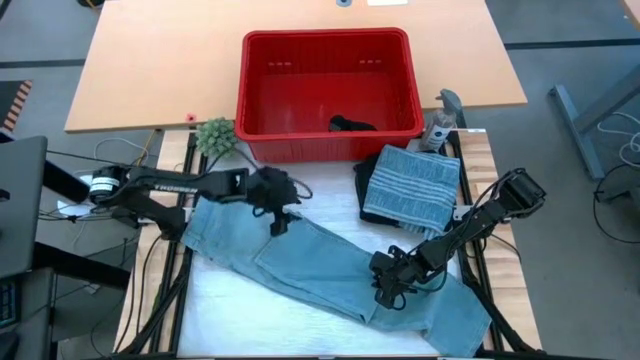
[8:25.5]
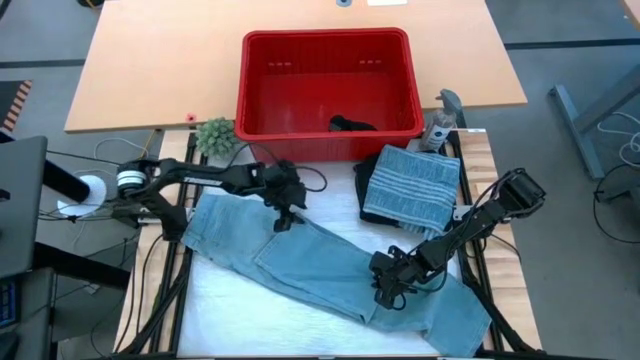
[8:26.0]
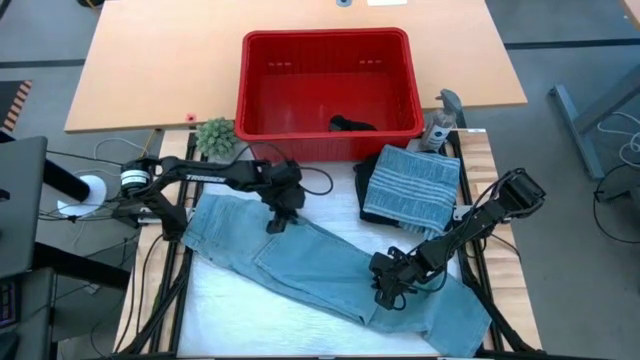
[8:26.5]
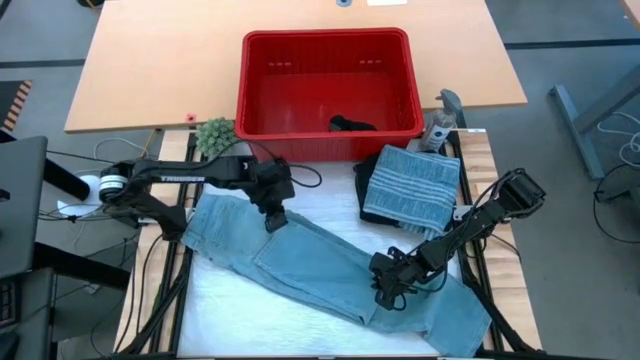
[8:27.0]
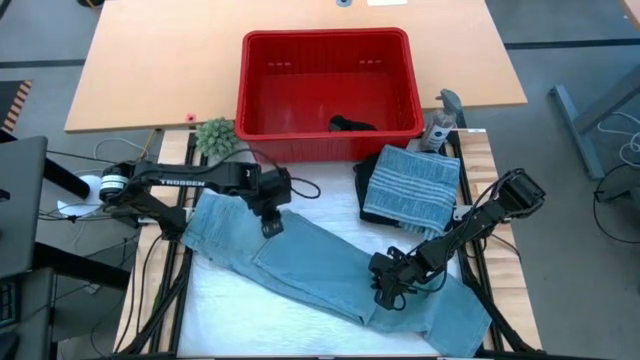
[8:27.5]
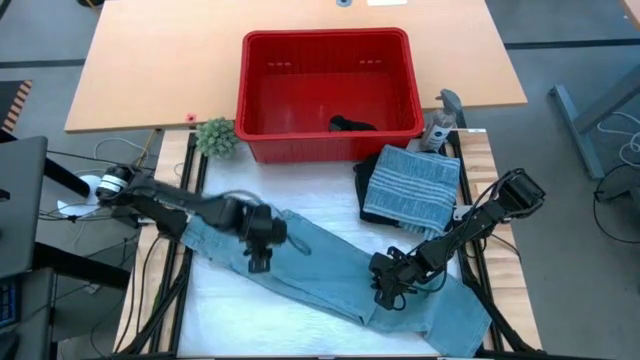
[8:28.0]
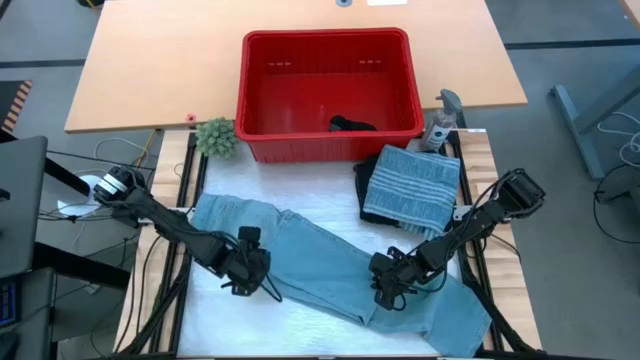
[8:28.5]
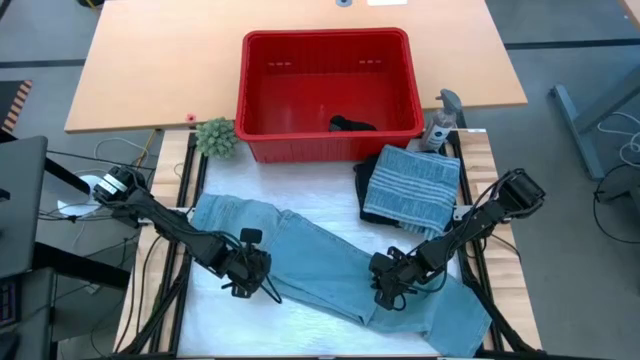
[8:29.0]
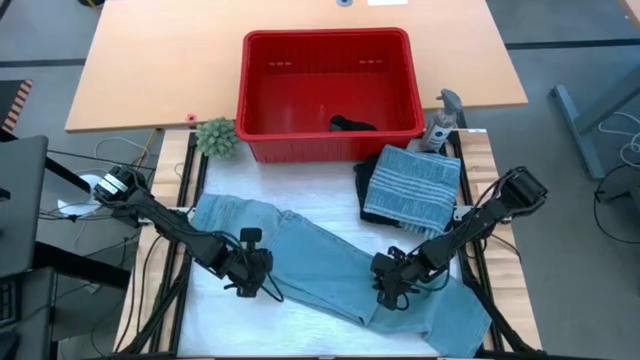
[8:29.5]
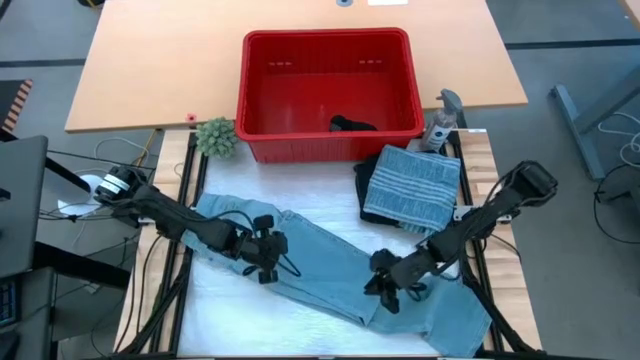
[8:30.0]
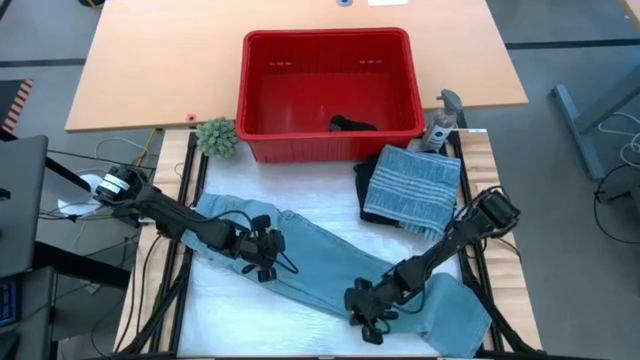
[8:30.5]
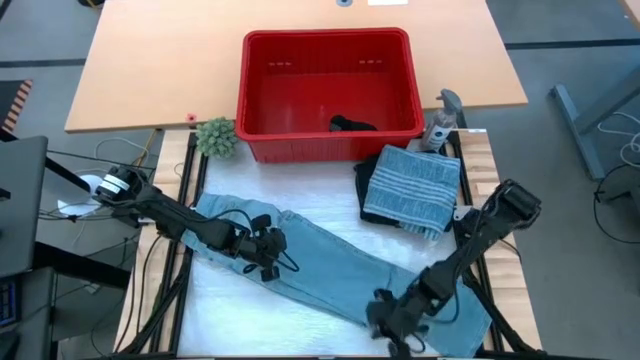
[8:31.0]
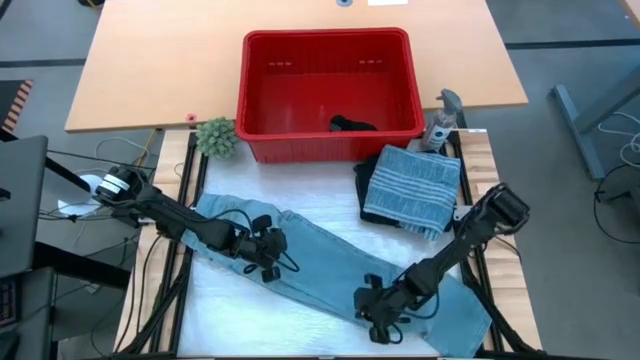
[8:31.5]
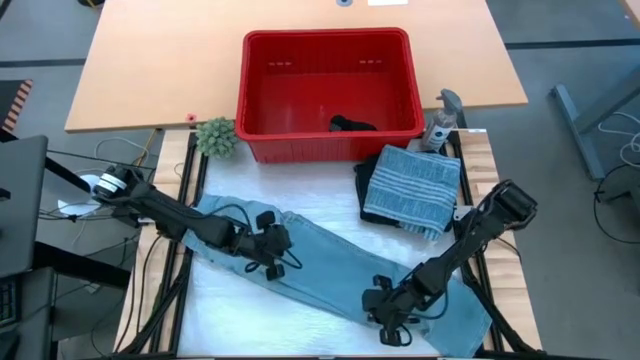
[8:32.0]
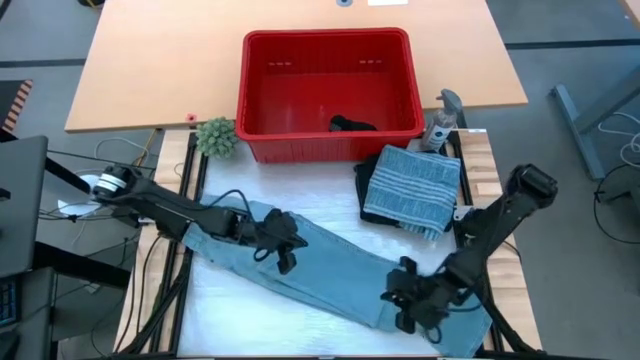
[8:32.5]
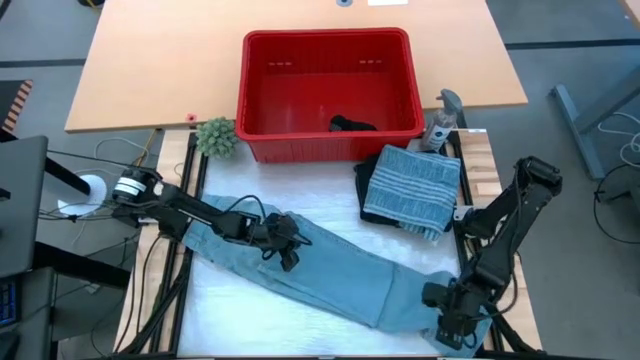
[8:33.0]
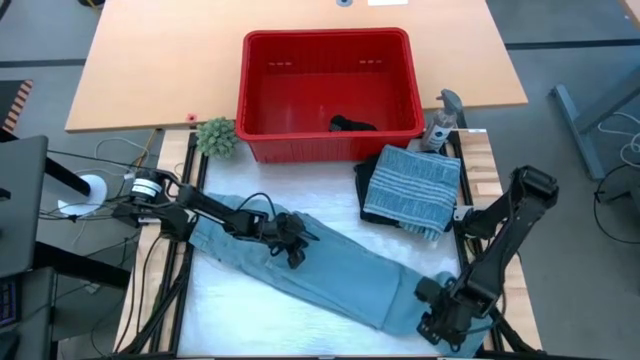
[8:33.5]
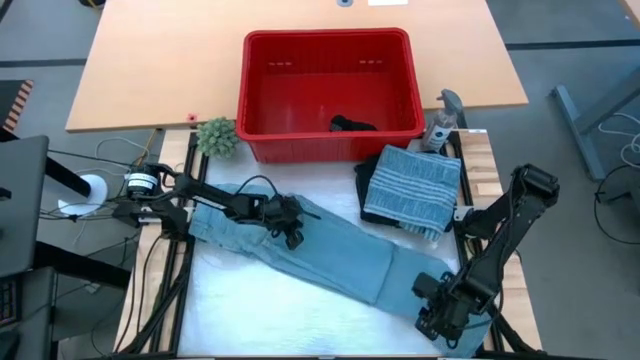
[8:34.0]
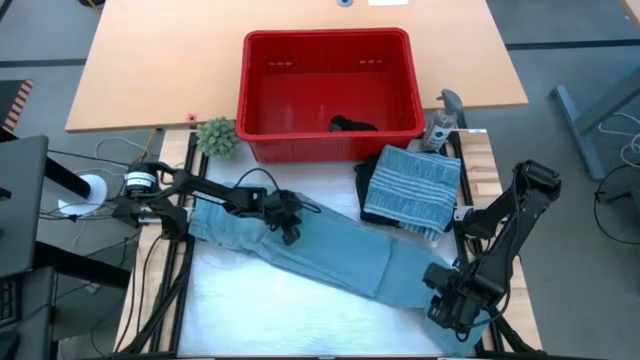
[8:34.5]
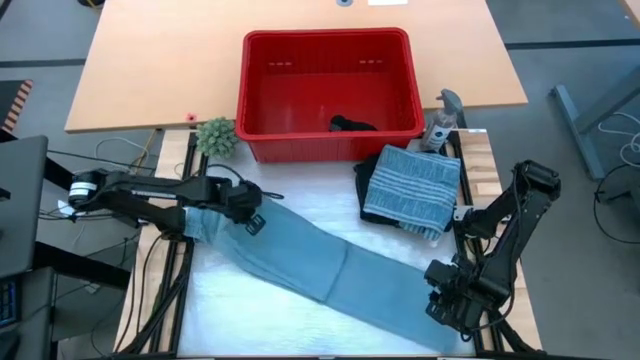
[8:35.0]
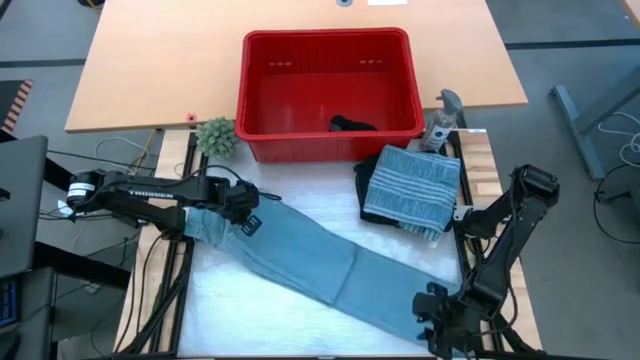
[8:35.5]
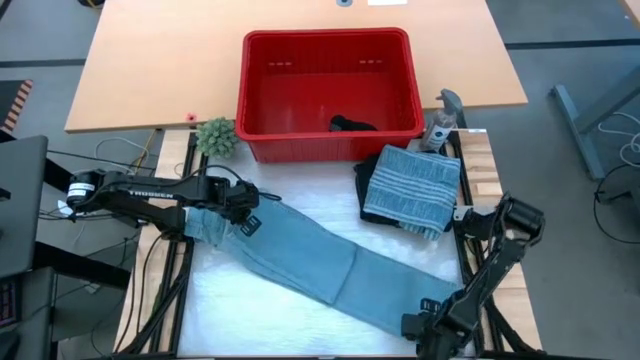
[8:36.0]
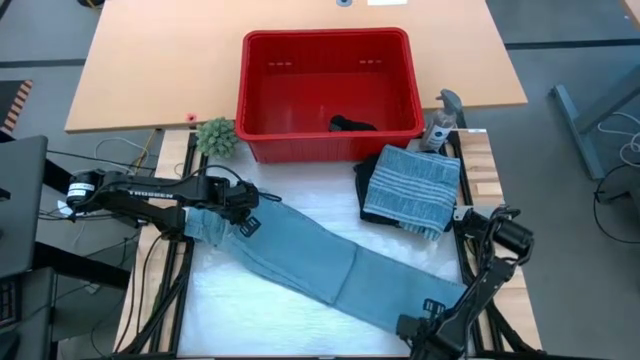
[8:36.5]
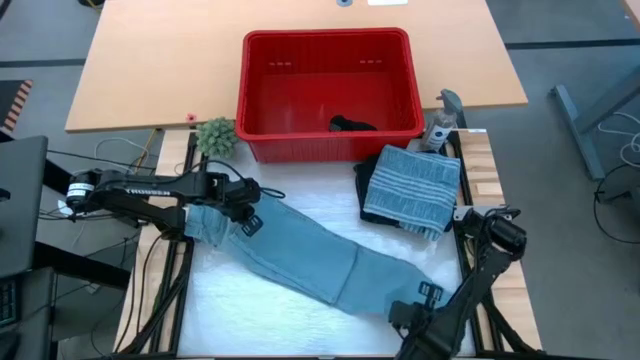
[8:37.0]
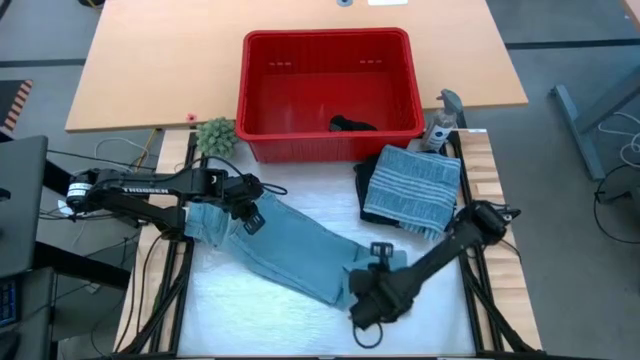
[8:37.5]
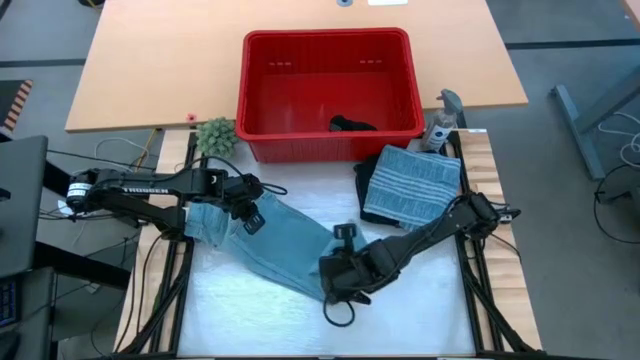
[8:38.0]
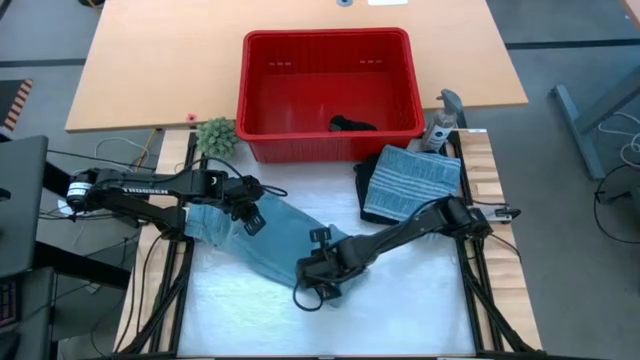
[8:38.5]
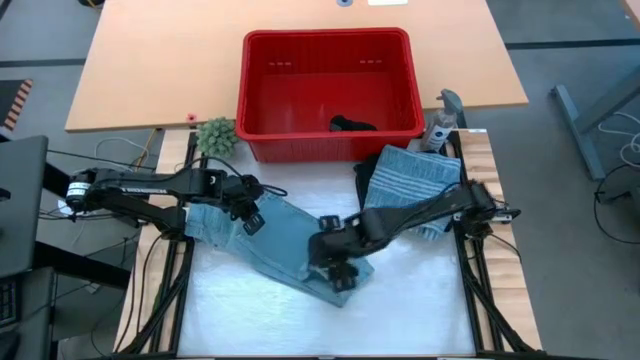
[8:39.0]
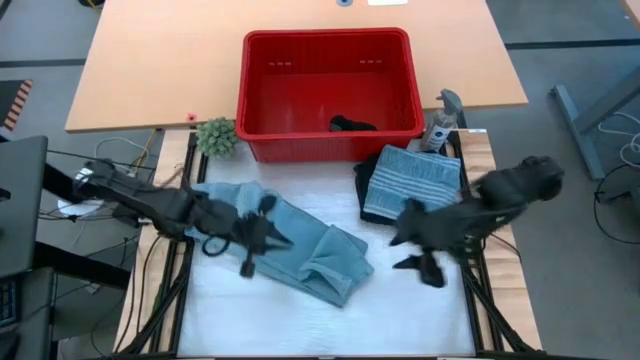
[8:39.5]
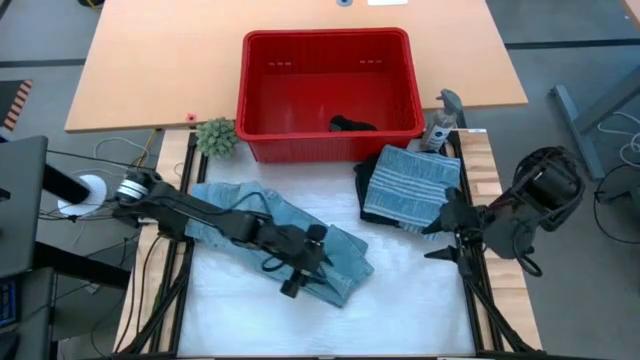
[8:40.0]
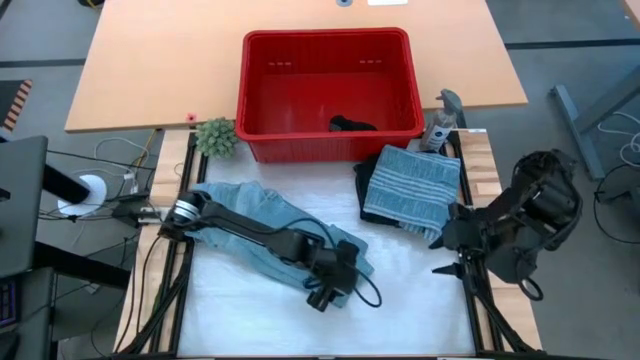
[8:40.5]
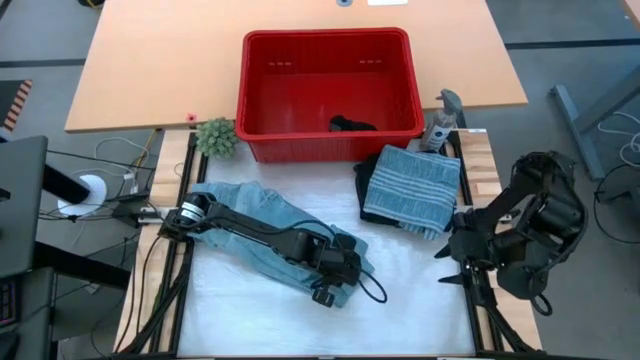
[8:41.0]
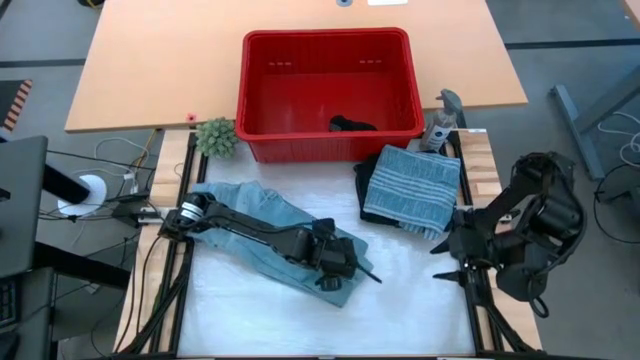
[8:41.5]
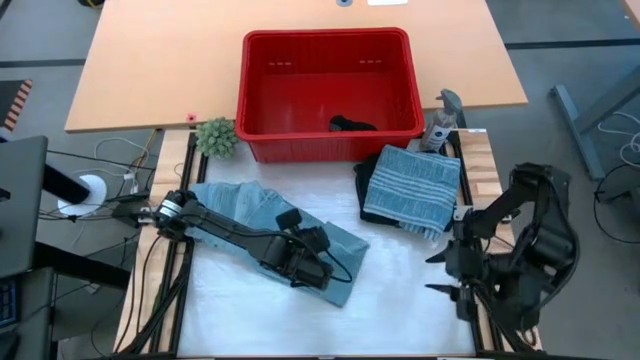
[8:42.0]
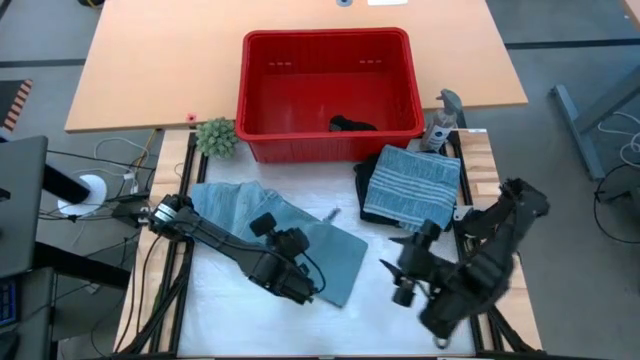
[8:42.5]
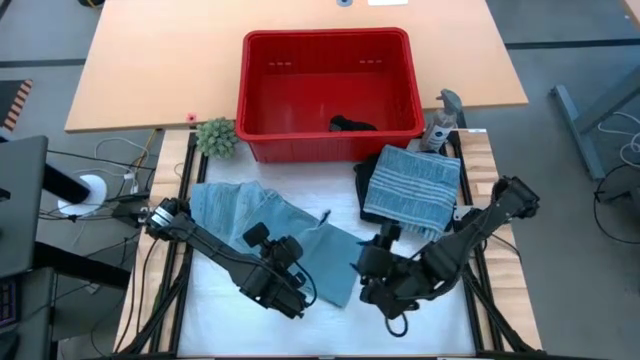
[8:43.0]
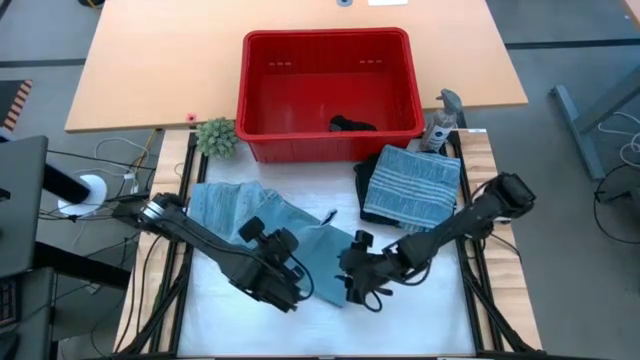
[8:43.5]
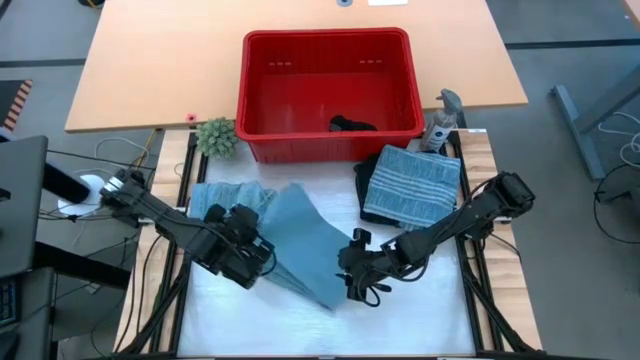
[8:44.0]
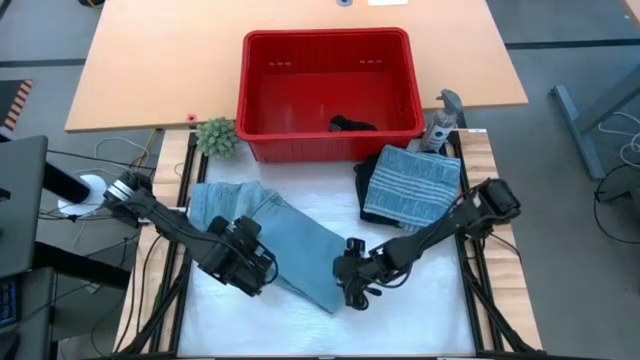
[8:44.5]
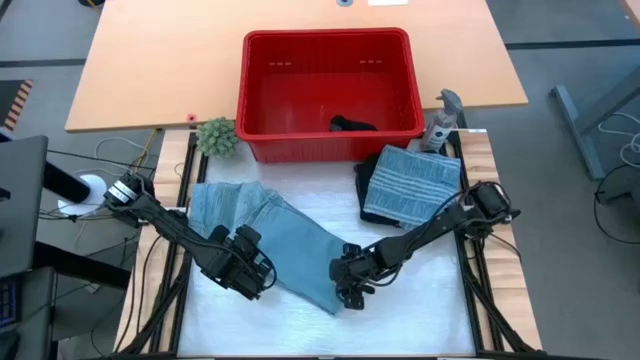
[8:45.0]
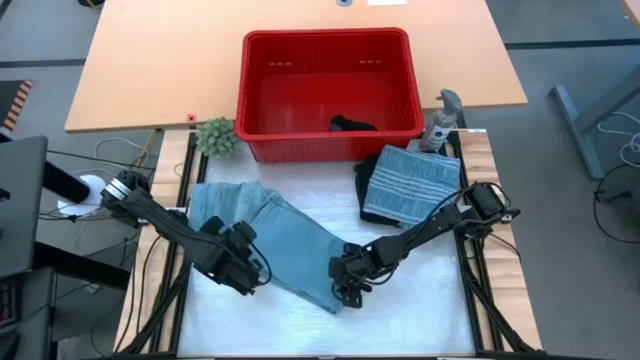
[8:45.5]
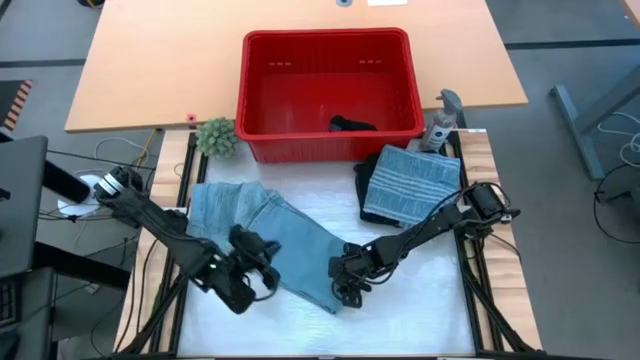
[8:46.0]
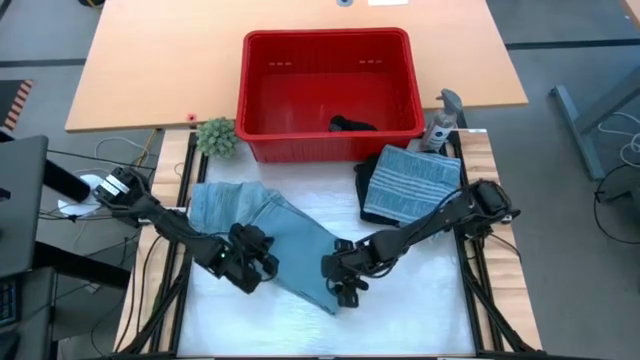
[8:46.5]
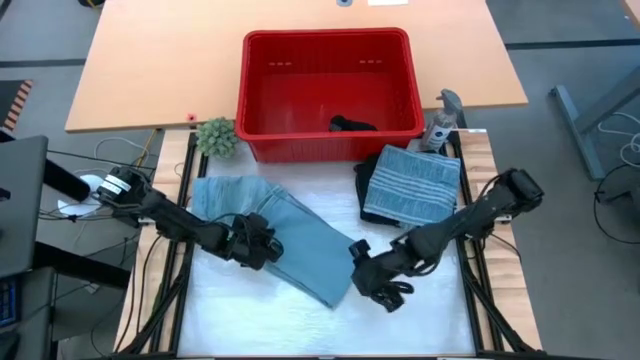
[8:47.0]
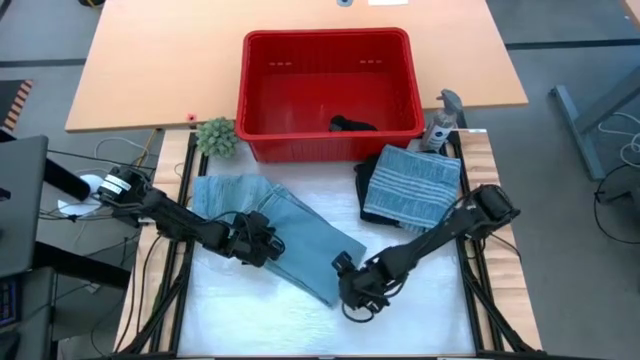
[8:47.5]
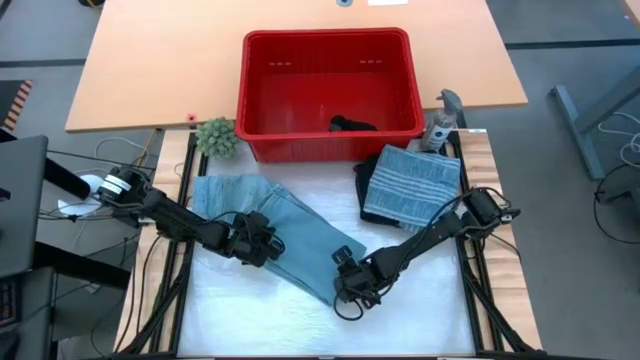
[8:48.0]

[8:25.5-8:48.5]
Task: Fold Laundry from Bin
Fold the blue pants
